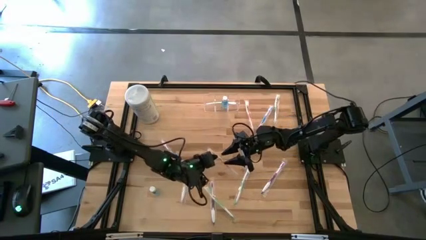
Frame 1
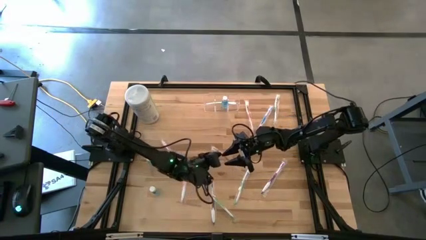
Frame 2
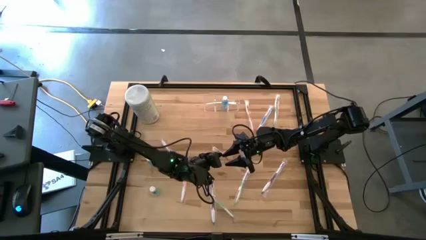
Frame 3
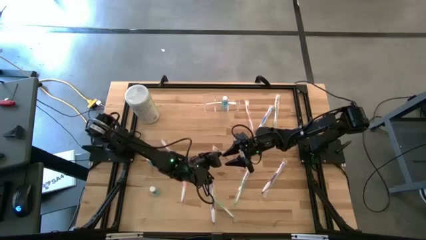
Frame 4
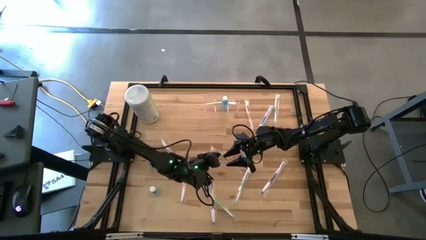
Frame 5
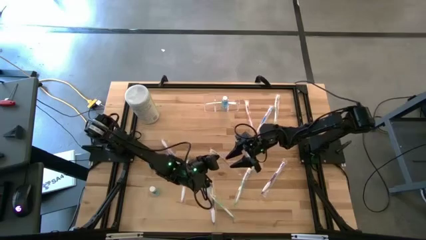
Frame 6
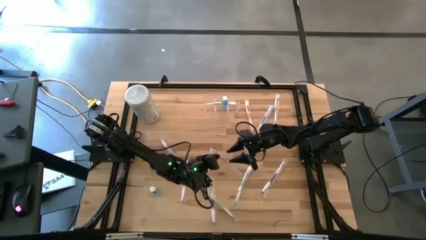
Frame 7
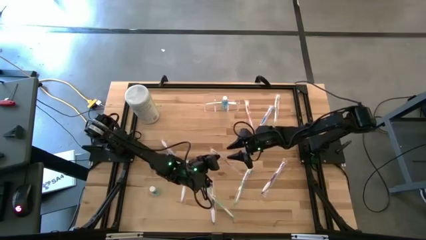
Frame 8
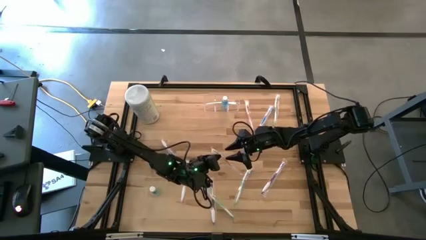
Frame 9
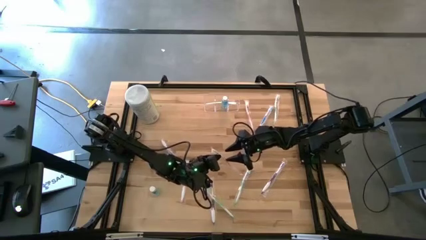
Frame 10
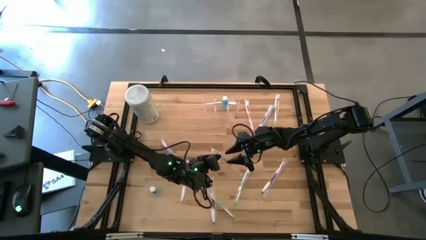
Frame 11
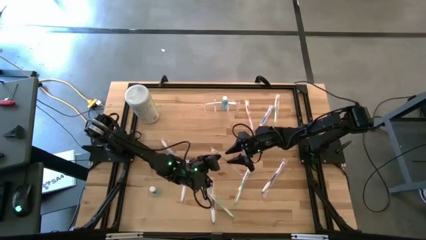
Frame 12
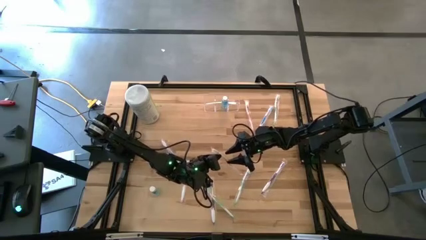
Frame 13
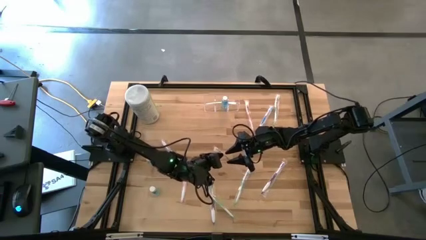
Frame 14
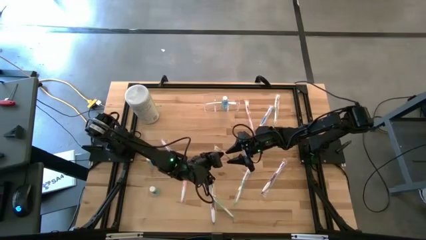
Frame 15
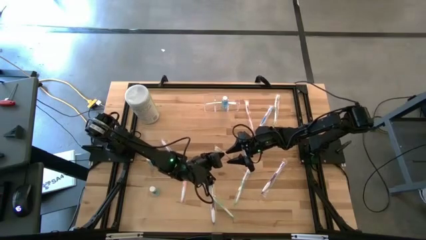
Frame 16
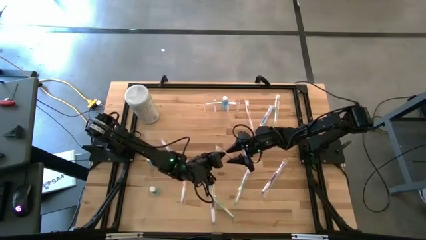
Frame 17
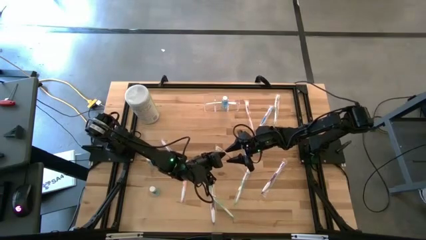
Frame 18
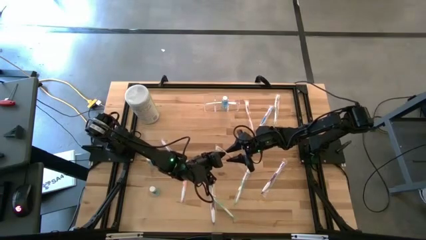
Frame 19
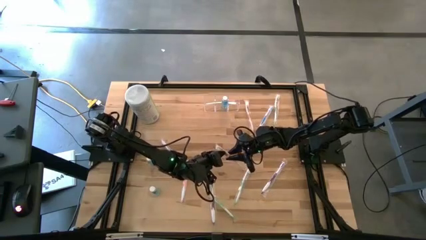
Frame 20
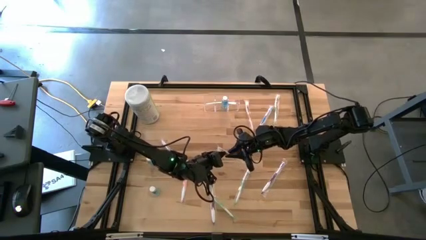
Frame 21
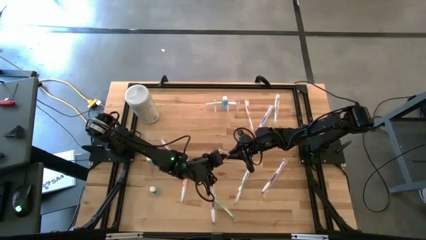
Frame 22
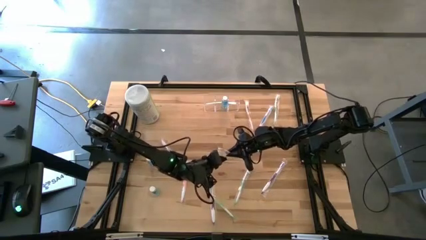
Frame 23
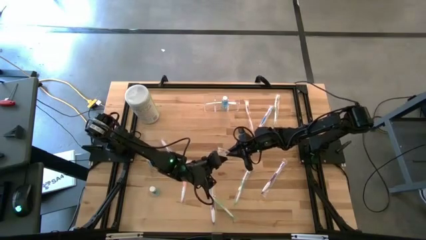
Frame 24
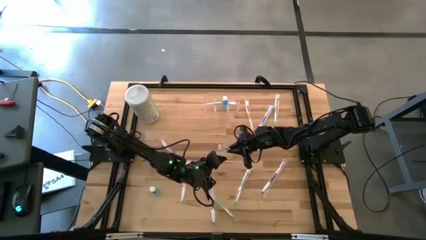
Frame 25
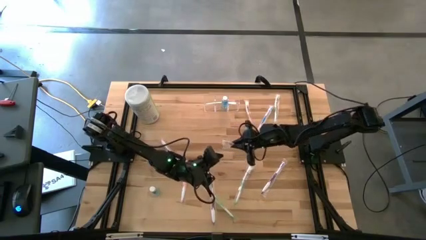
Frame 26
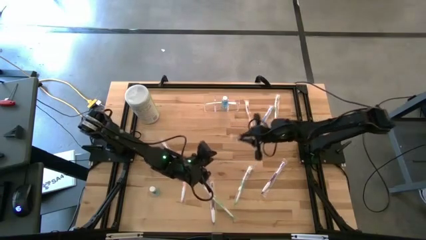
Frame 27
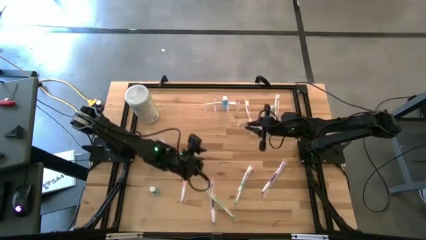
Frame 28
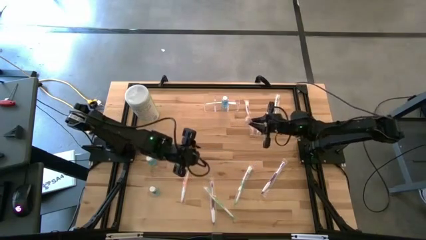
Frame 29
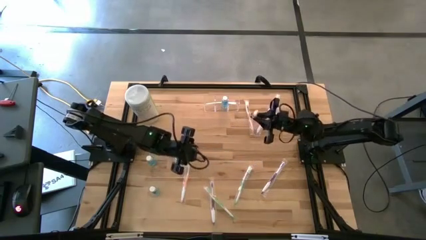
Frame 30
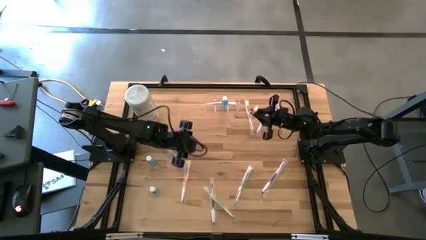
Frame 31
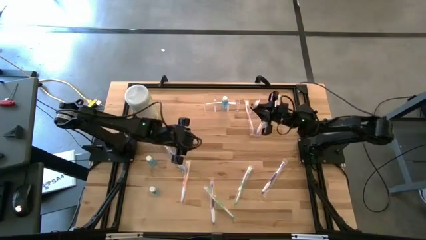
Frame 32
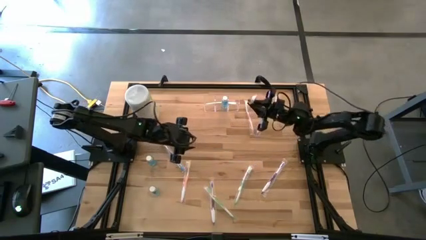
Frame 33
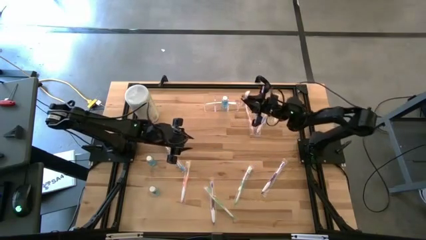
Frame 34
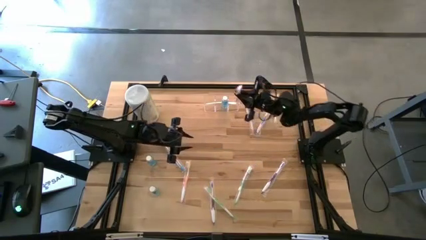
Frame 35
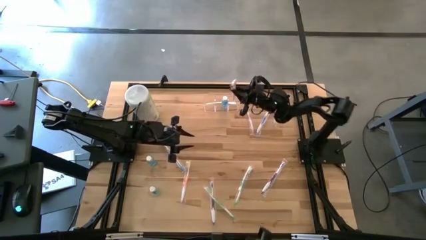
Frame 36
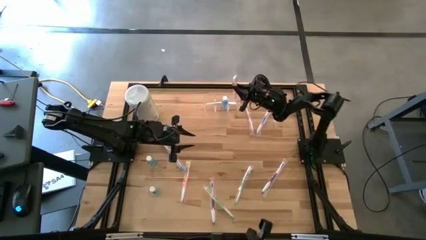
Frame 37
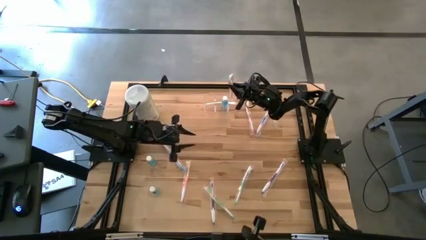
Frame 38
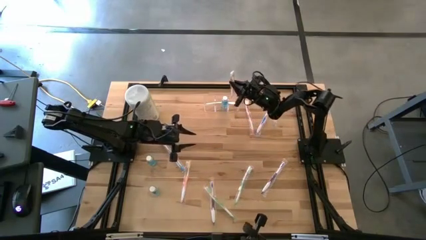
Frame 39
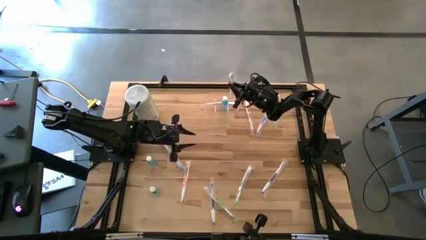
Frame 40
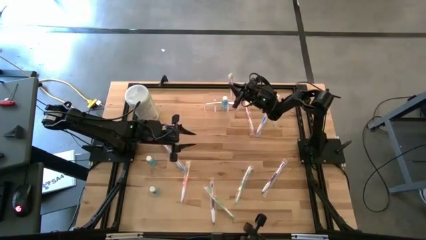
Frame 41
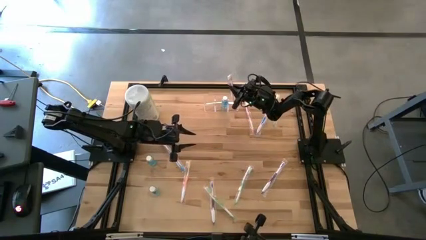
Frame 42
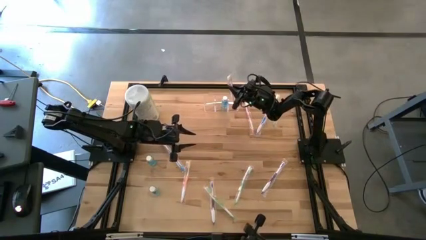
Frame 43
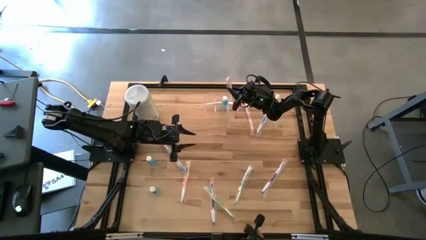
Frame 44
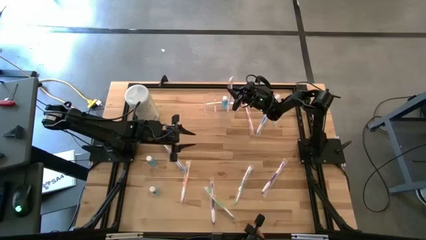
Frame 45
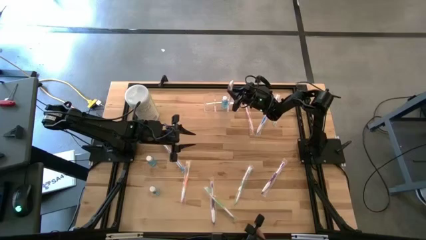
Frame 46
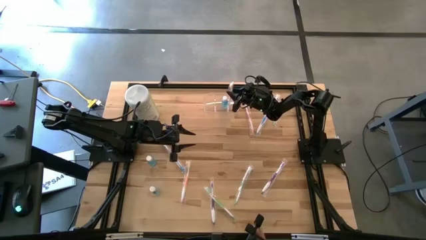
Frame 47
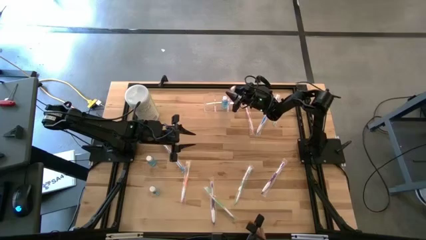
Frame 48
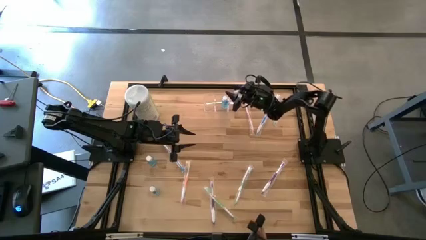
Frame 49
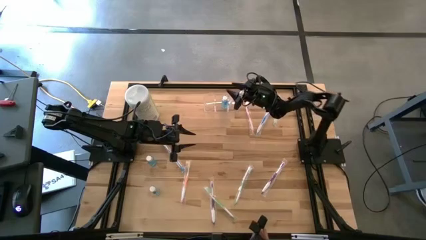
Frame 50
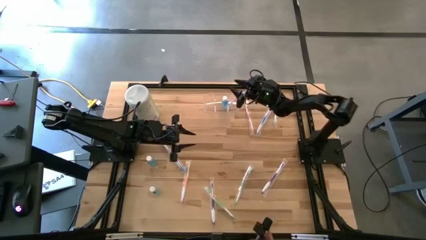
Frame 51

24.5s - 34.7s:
Task: Pick & Place toothbrushing station
Put the middle orange toothbrush into the transparent organizer

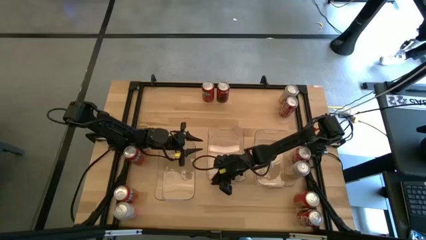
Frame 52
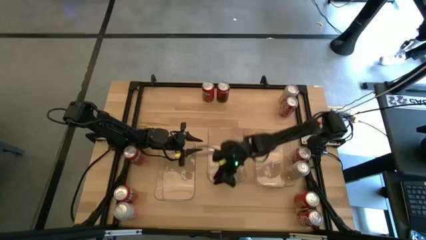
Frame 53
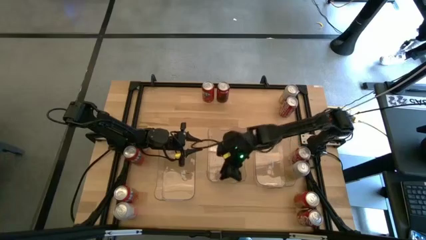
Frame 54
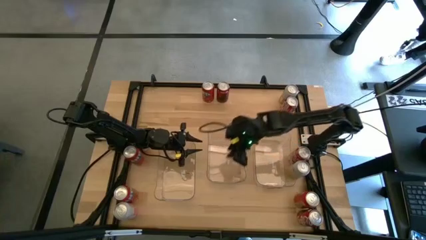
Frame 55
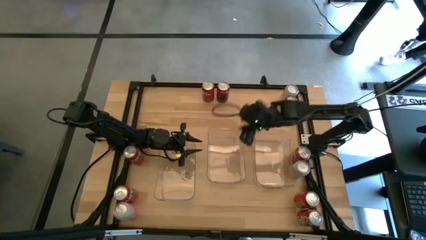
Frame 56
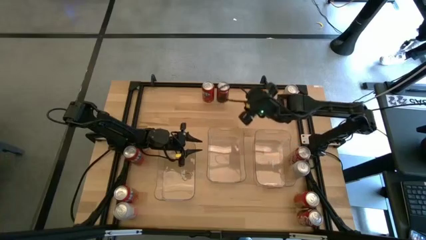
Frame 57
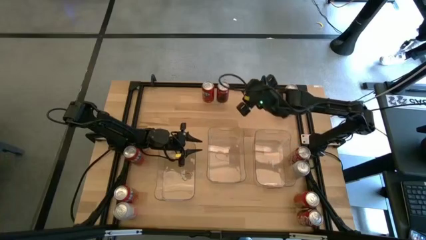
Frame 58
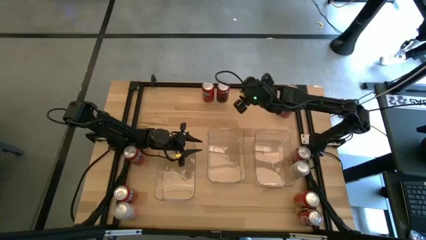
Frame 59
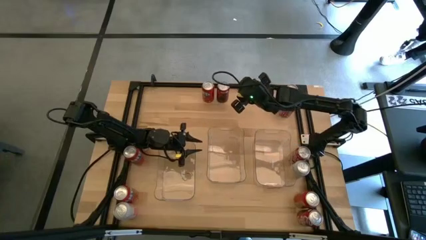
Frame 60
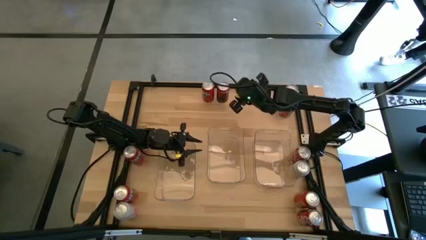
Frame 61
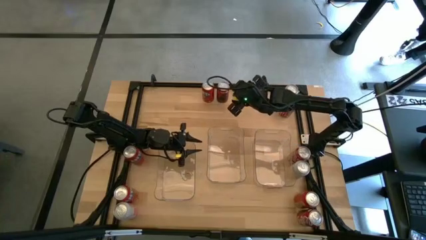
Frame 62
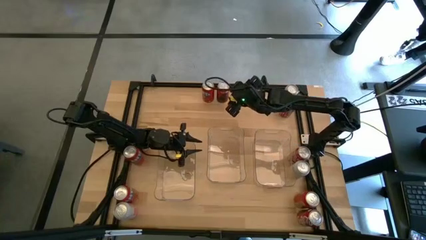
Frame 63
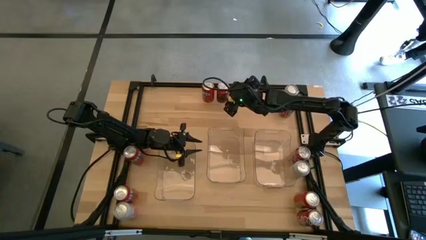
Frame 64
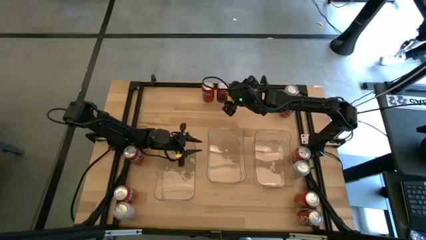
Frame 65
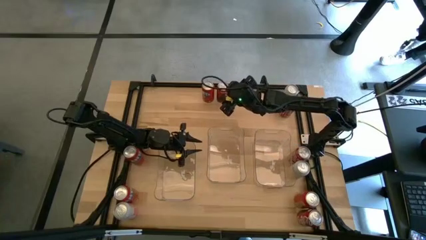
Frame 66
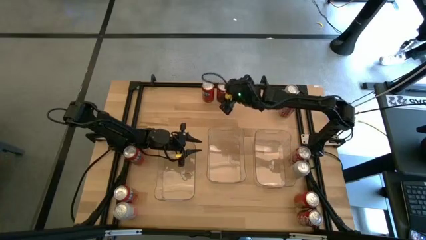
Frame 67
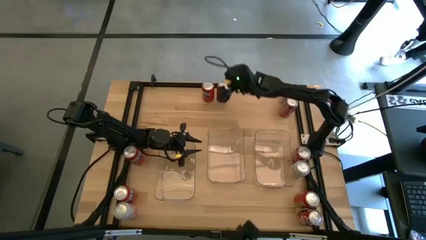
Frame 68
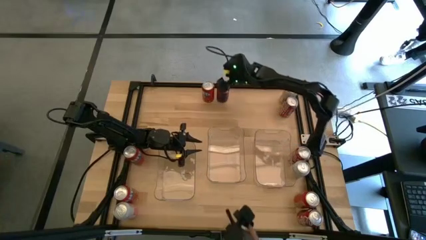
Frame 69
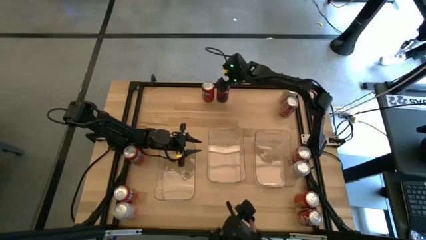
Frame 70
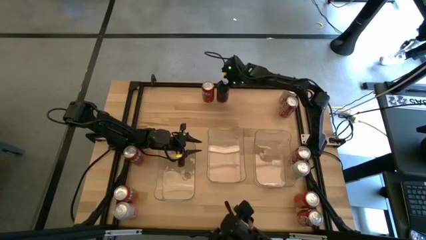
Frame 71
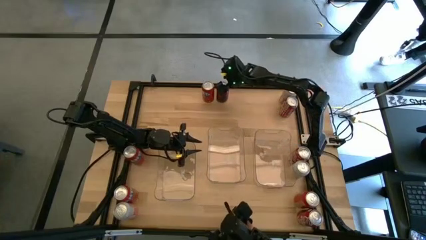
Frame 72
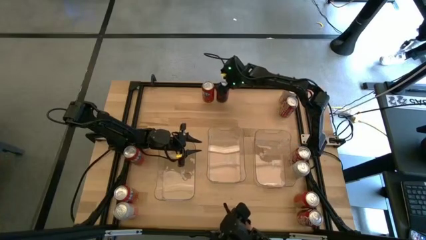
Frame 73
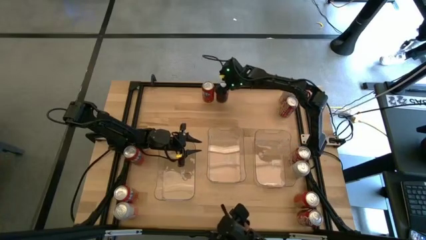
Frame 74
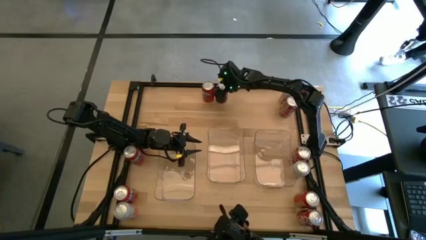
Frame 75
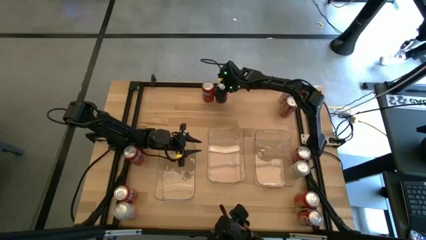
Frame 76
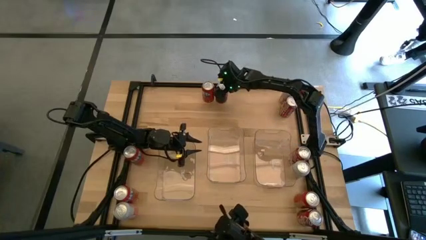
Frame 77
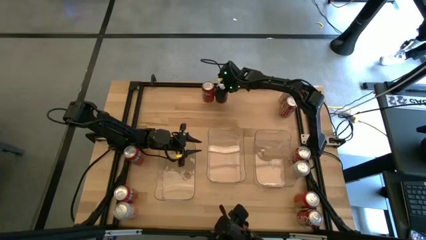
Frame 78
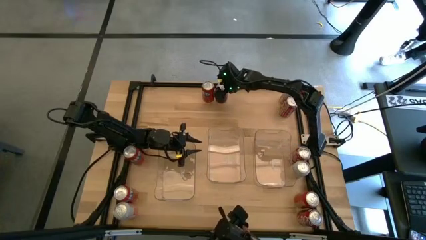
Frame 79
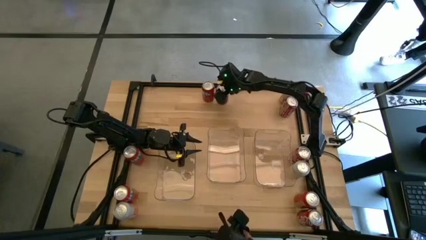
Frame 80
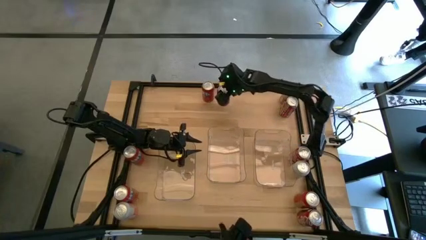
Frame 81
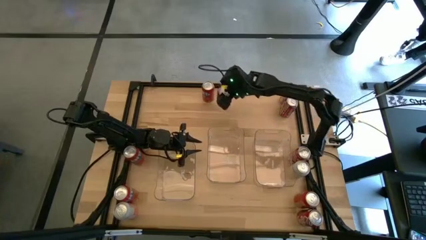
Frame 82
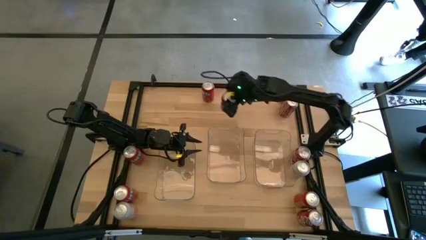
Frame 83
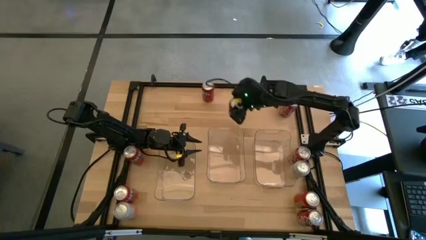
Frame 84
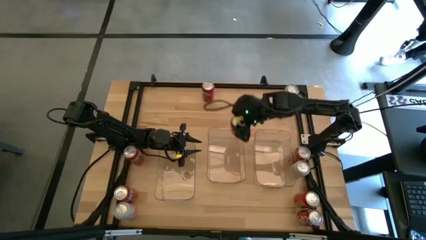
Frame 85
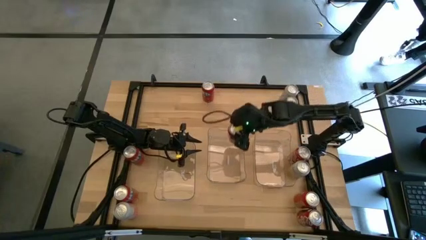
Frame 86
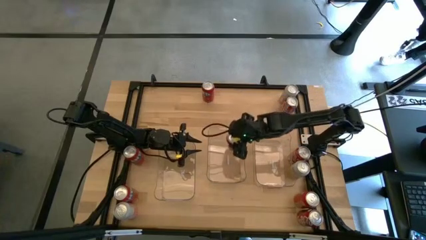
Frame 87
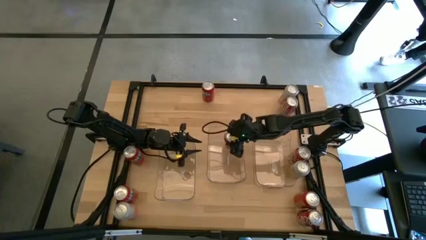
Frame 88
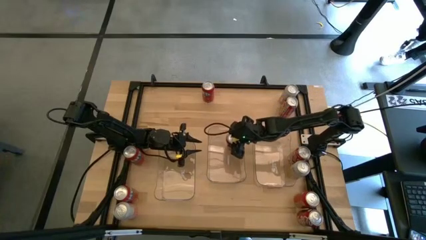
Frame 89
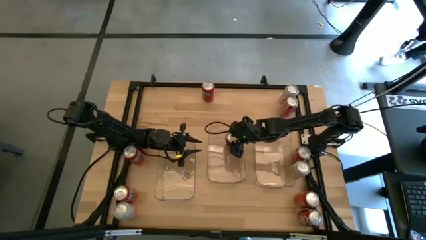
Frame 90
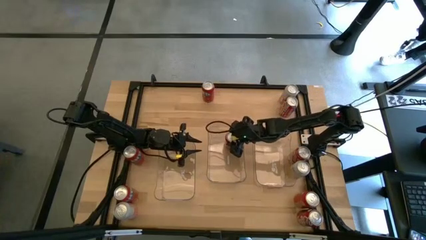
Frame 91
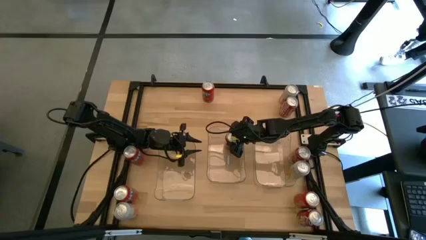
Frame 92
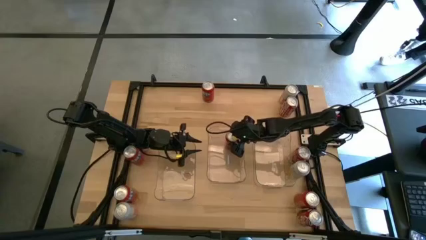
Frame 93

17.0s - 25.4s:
Task: Sort soda cans
Put the top left red white soda can into the center transparent bin
